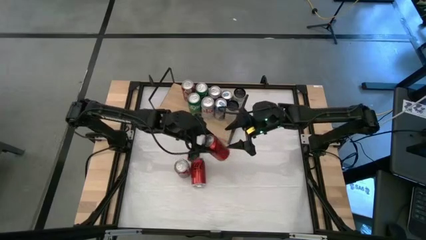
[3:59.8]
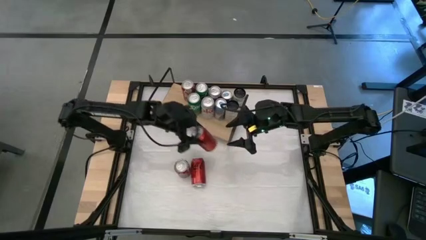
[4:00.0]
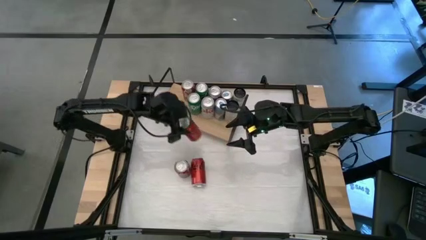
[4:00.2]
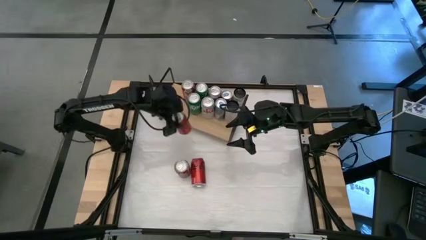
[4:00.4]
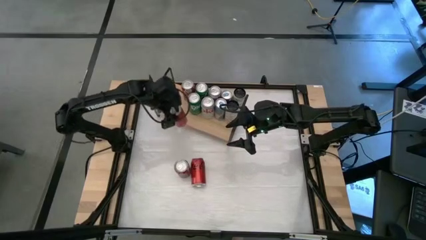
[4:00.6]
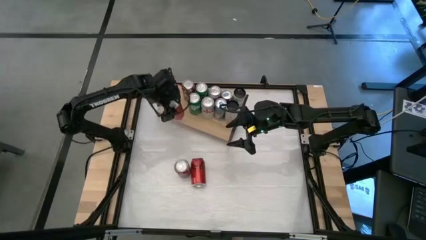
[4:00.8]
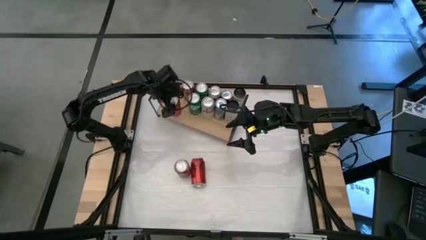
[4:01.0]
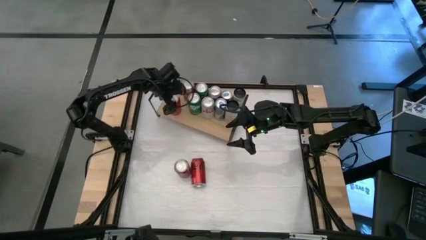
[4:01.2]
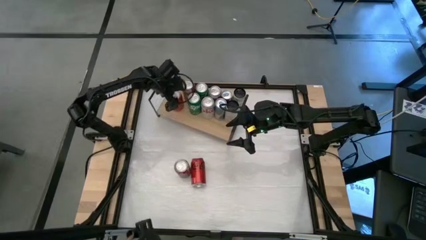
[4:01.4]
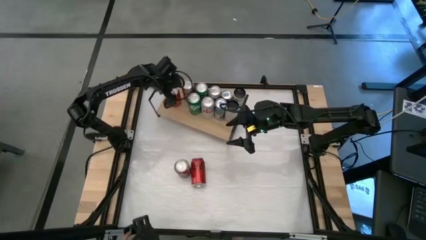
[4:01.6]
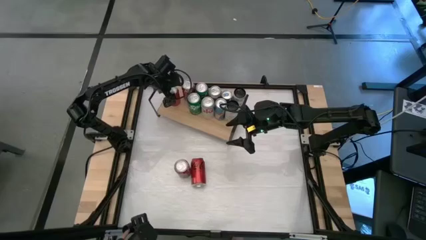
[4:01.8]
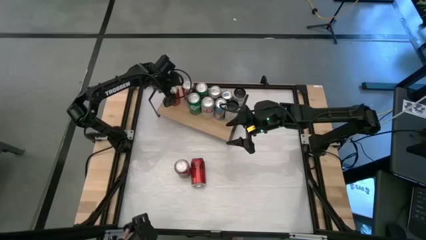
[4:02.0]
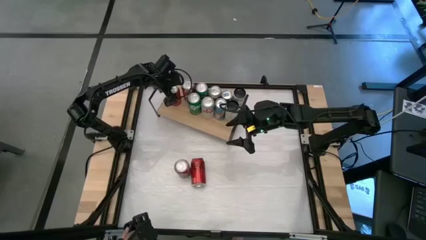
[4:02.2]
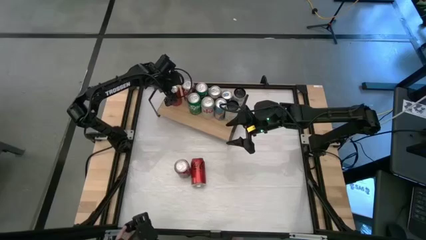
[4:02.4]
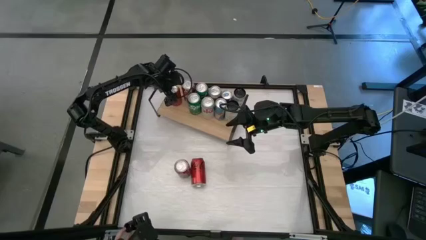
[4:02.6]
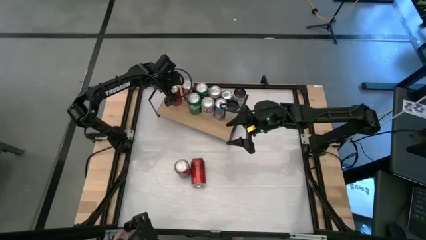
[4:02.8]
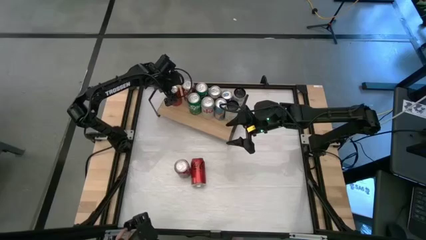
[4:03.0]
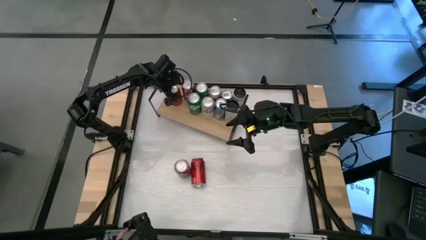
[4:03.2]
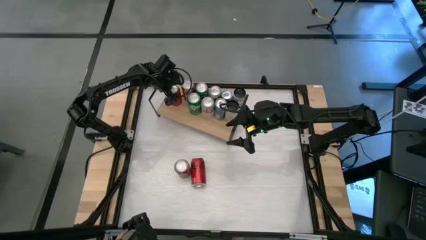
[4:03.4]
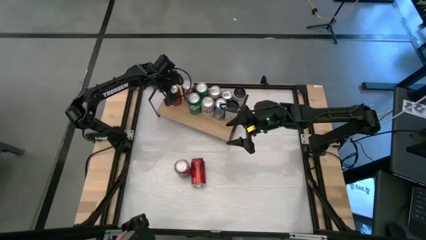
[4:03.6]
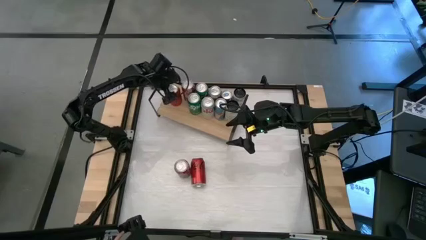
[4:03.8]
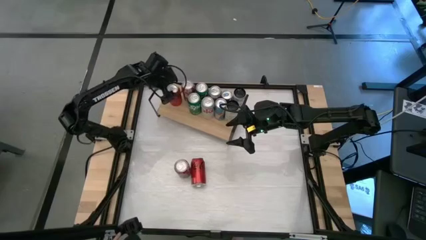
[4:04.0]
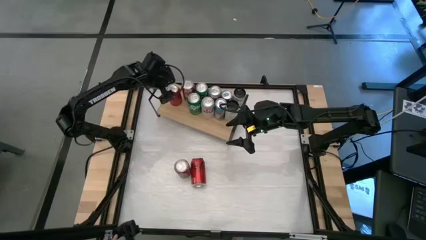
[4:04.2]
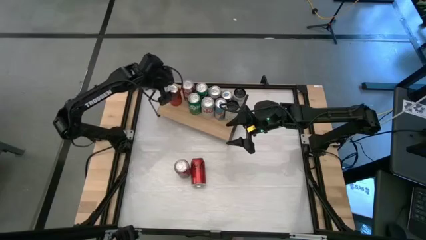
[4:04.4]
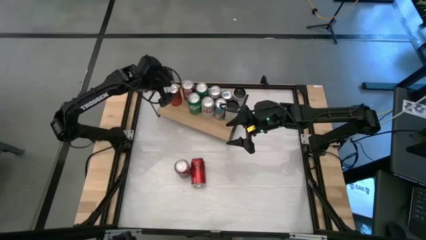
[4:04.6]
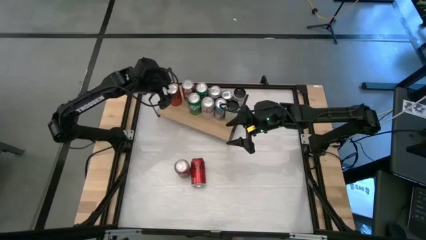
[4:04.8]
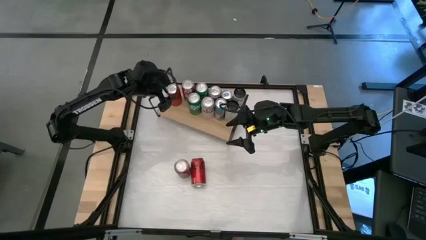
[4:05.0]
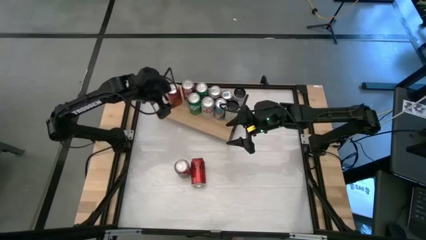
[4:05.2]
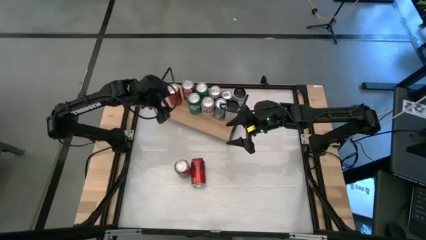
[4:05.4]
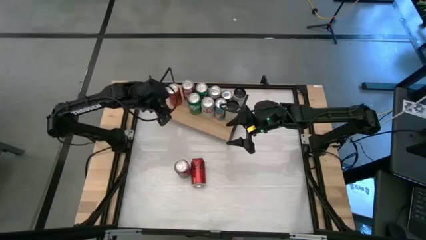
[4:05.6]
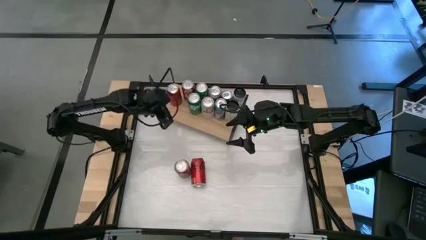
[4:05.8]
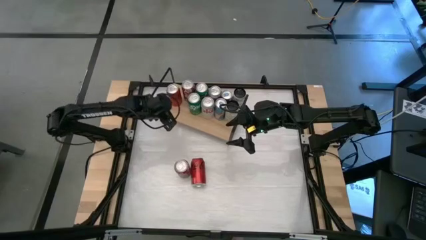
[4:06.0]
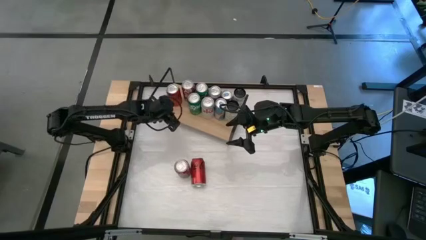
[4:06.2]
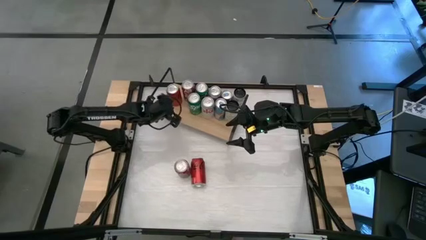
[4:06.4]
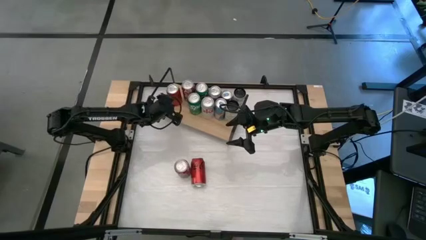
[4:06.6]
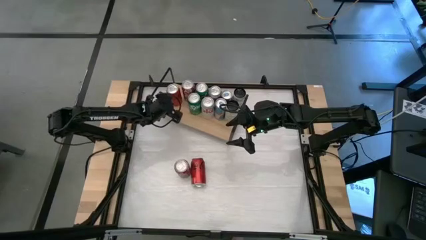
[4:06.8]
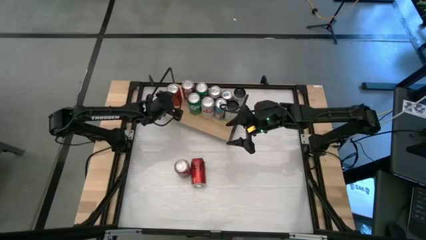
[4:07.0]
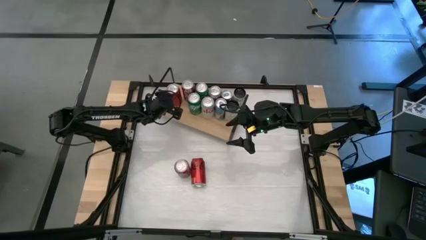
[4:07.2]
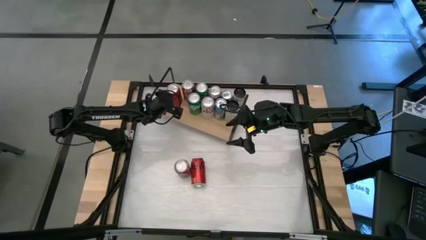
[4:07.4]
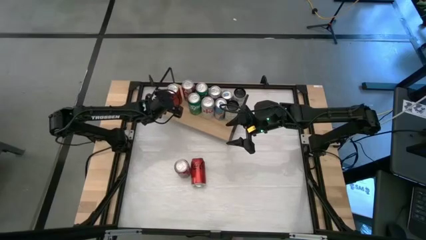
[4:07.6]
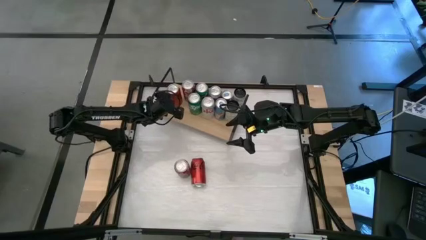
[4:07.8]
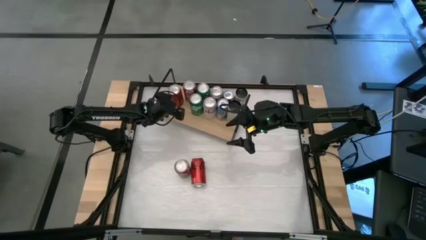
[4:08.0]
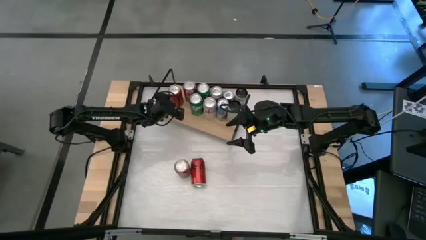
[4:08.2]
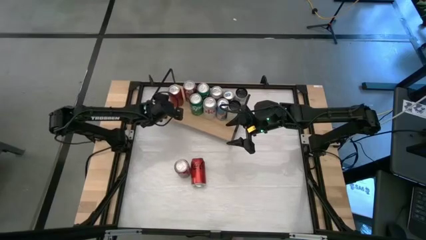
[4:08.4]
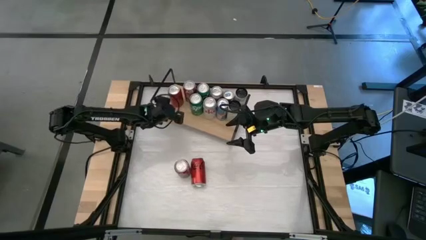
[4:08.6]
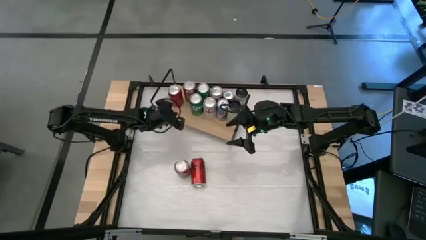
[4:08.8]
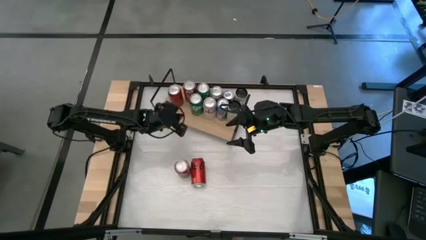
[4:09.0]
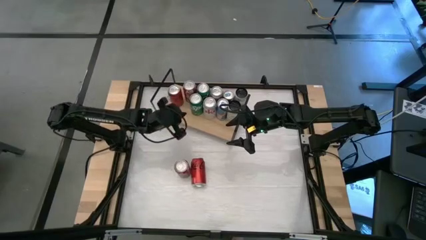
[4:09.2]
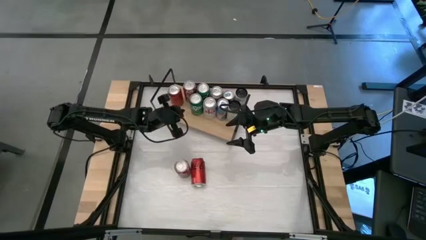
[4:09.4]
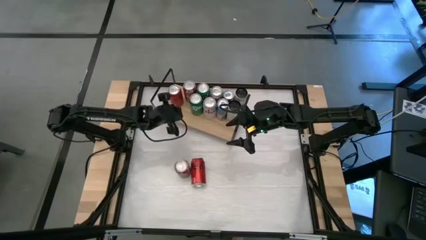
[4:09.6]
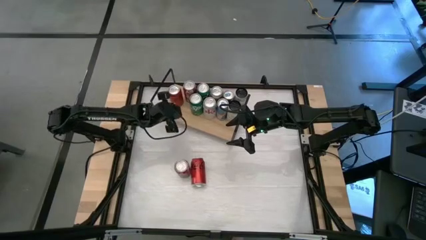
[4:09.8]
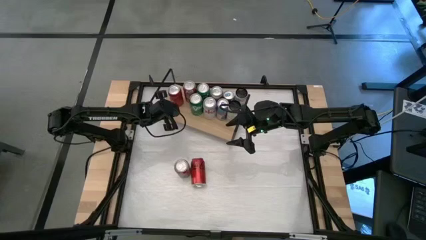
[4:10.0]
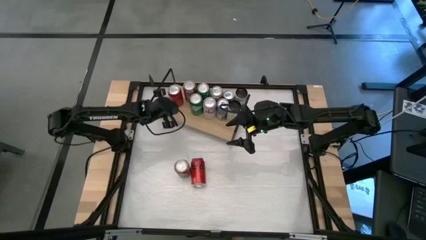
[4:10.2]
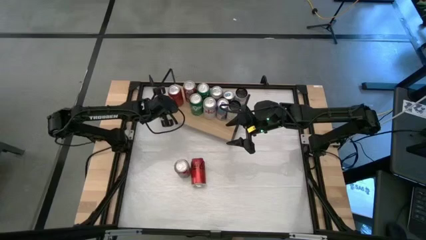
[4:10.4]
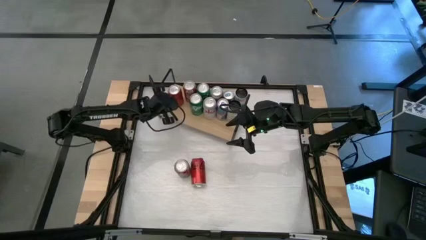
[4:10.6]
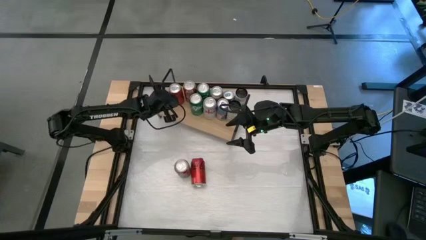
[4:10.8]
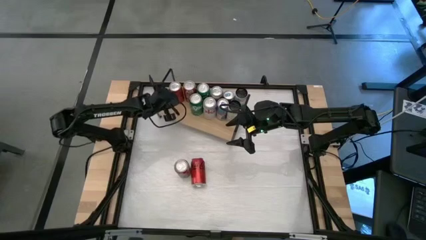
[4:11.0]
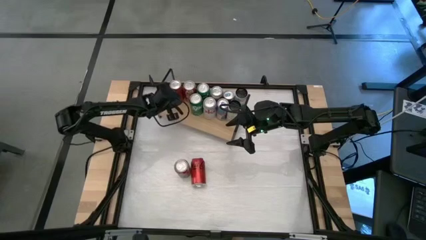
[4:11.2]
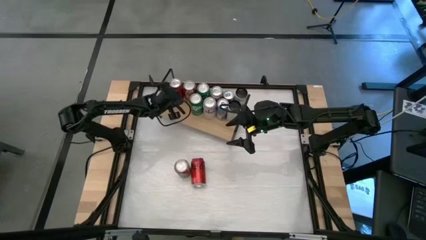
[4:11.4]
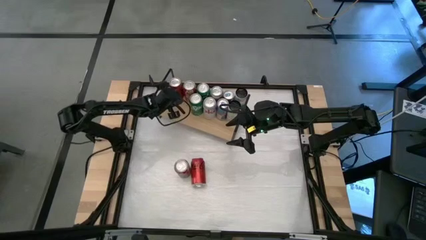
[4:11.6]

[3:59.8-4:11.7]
Task: Place canned beverage on shelf
Put the left red black soda can on the shelf

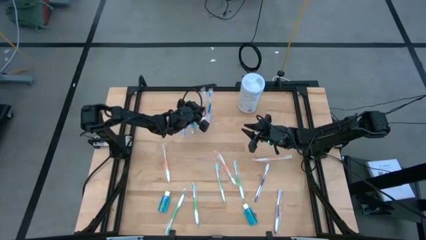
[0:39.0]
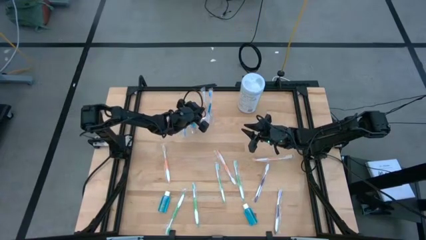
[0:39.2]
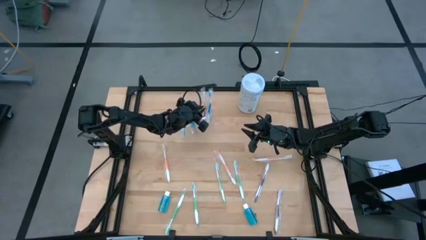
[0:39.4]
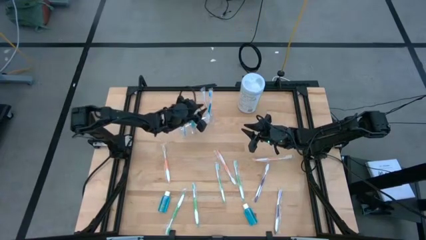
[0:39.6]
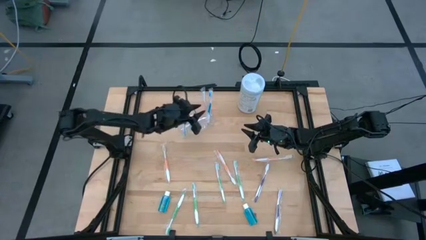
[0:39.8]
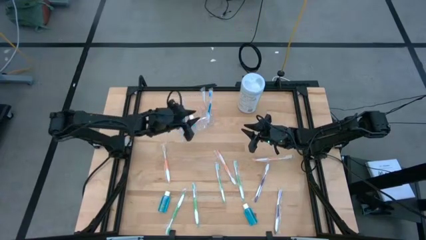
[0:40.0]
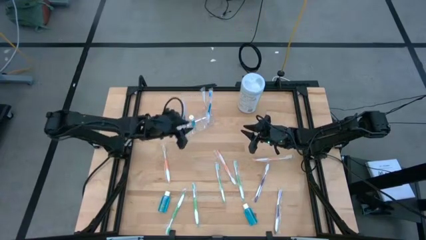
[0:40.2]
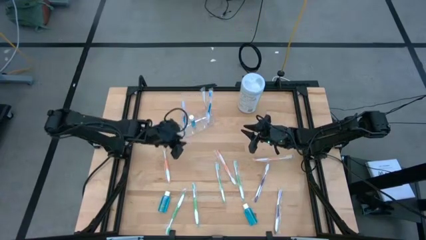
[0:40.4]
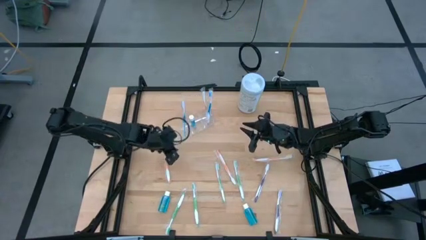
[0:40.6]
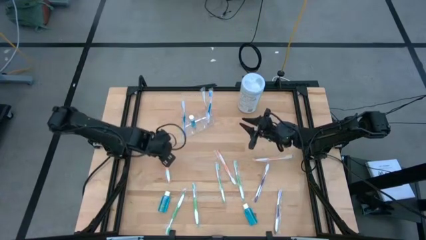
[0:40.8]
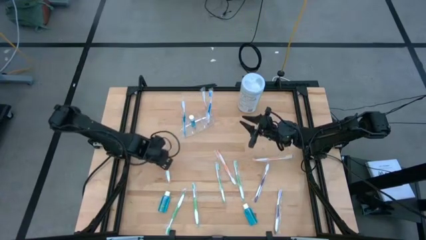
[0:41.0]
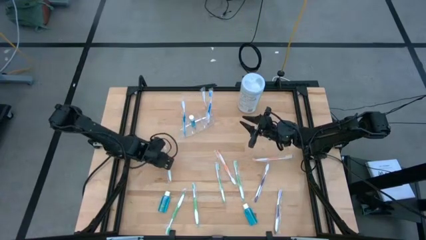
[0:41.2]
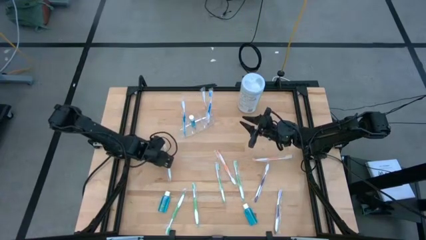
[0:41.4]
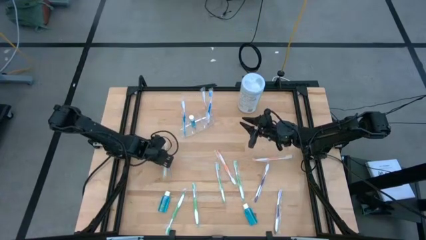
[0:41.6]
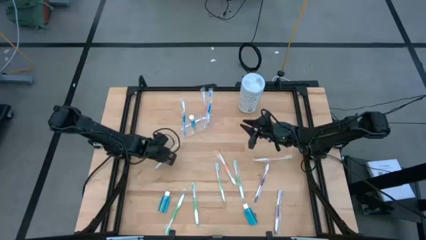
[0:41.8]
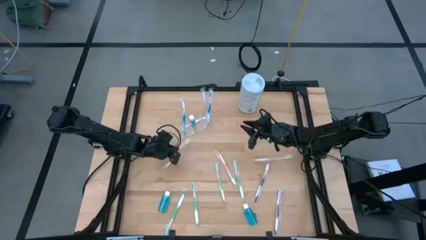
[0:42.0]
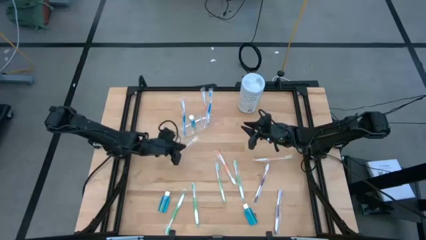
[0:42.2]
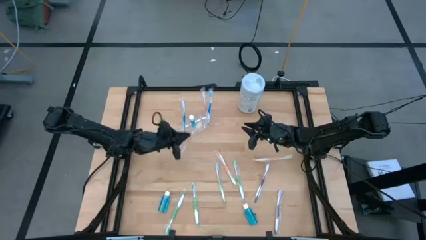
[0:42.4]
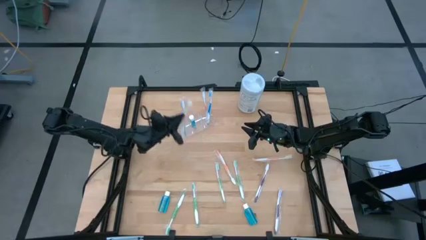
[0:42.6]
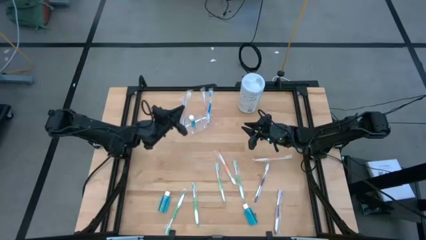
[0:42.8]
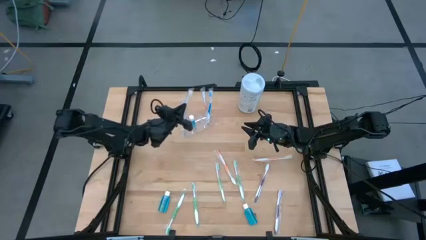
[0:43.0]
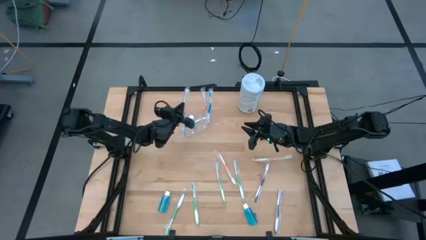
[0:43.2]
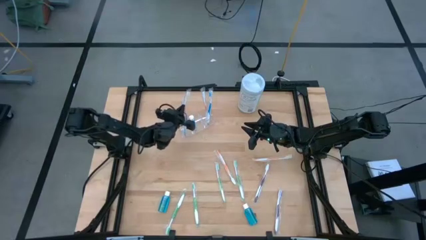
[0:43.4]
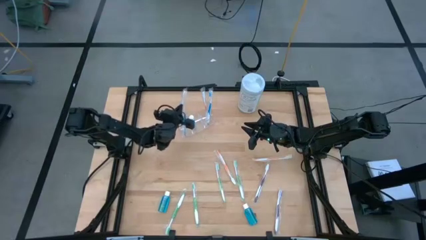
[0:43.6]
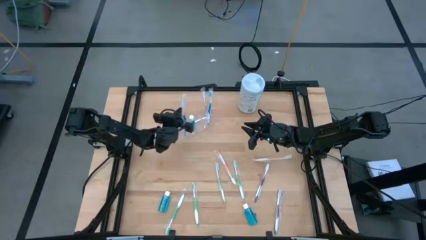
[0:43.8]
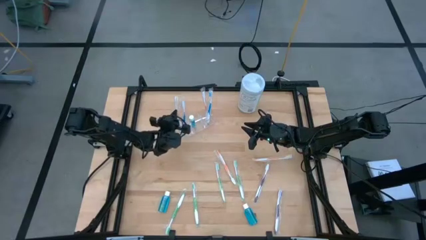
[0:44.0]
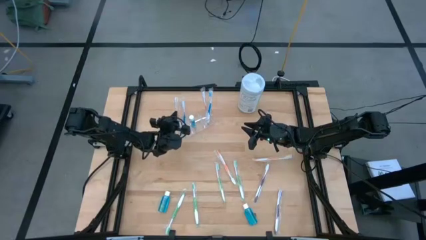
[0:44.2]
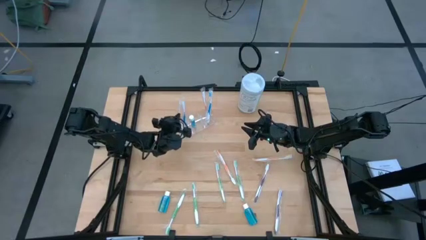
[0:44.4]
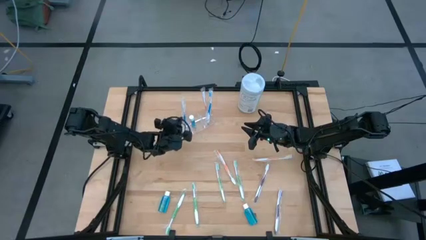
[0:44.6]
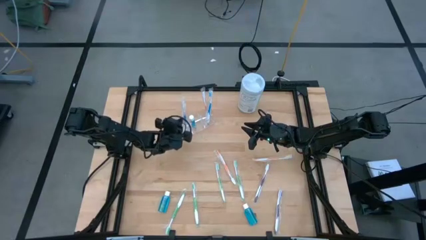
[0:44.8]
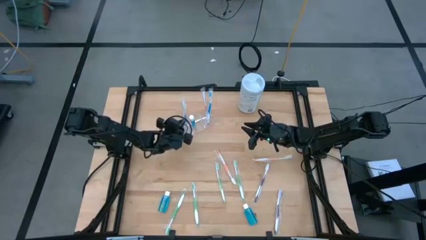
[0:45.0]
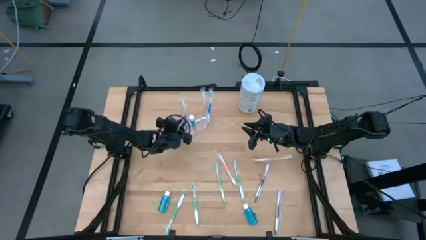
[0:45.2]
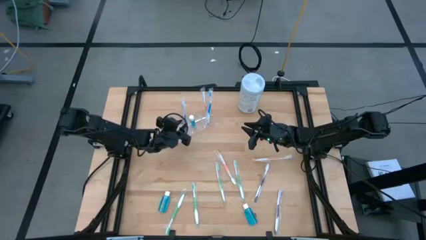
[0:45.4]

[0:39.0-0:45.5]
Task: Pick & Place toothbrushing station
Put the orange toothbrush into the transparent organizer
